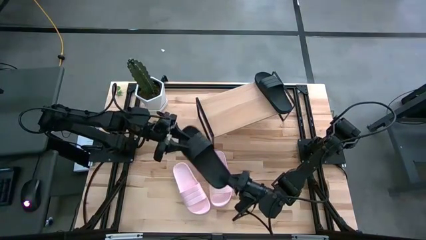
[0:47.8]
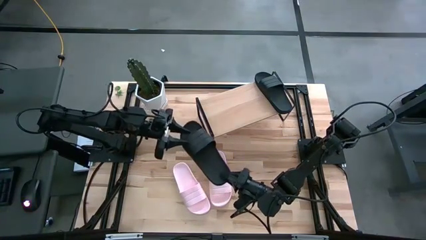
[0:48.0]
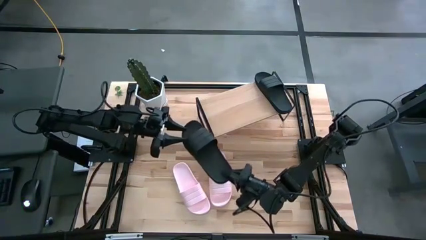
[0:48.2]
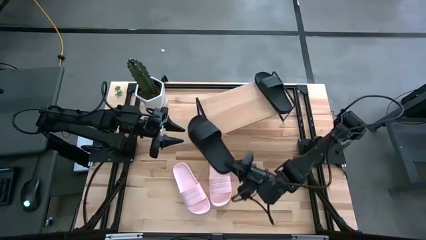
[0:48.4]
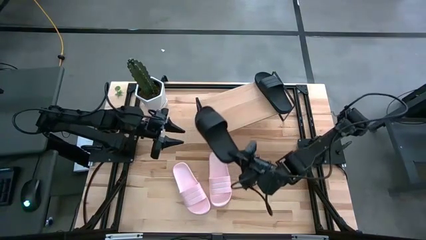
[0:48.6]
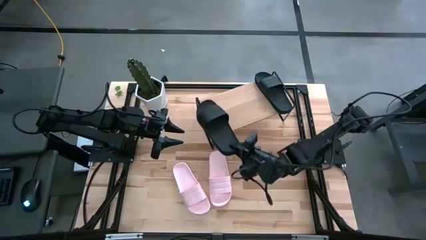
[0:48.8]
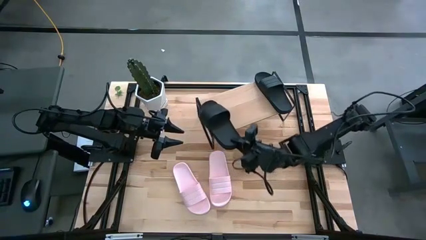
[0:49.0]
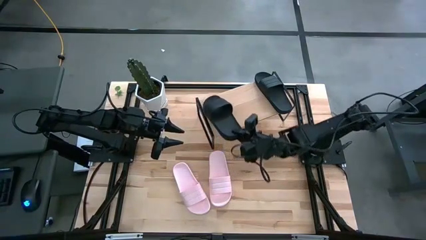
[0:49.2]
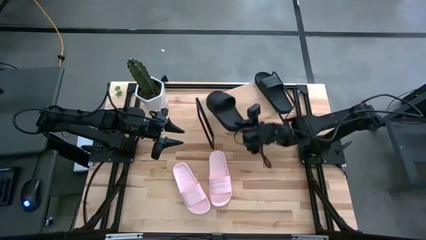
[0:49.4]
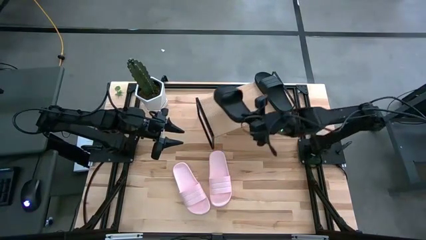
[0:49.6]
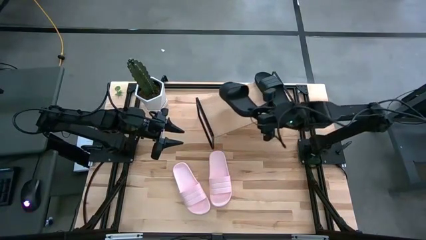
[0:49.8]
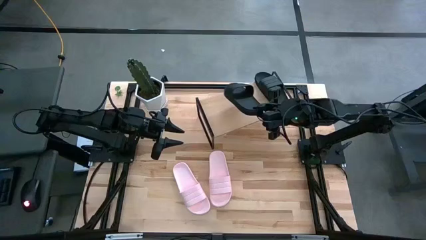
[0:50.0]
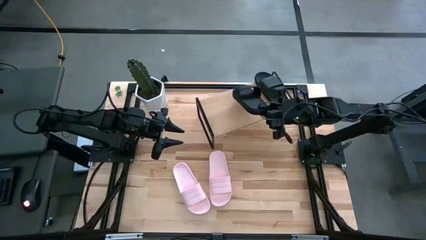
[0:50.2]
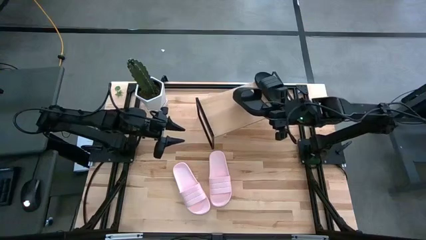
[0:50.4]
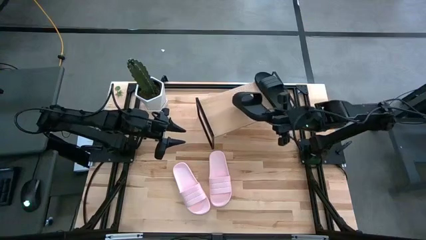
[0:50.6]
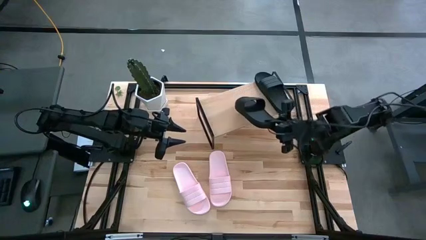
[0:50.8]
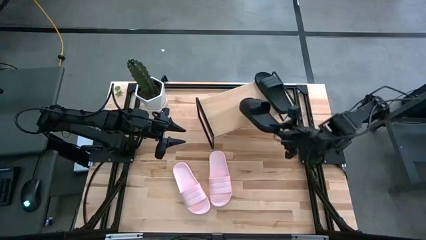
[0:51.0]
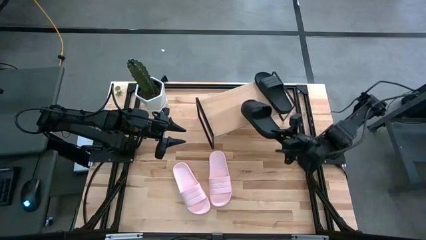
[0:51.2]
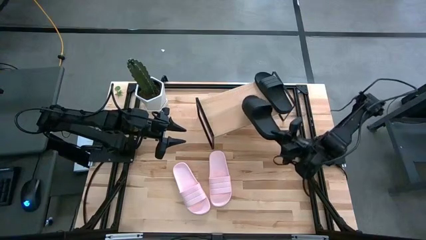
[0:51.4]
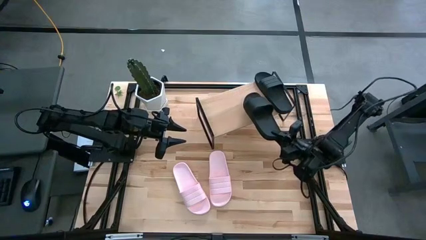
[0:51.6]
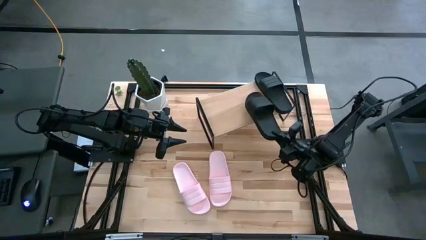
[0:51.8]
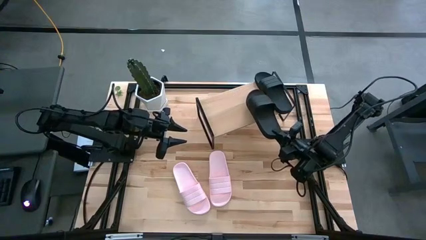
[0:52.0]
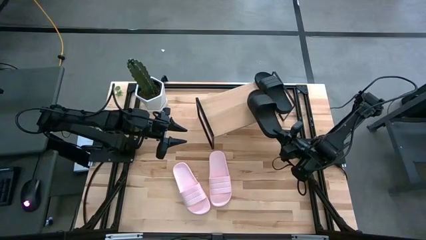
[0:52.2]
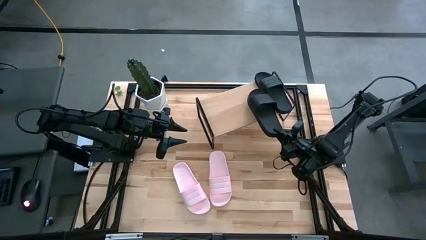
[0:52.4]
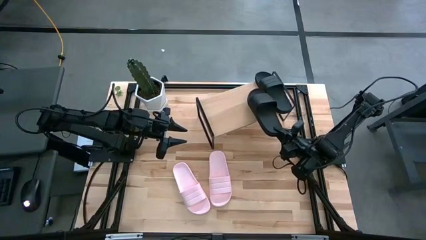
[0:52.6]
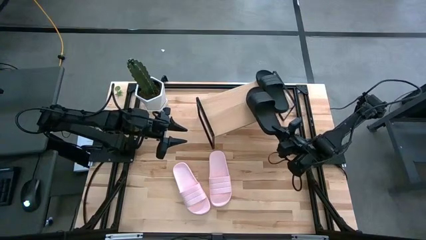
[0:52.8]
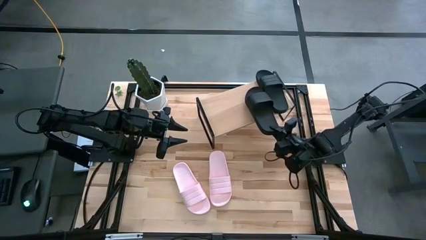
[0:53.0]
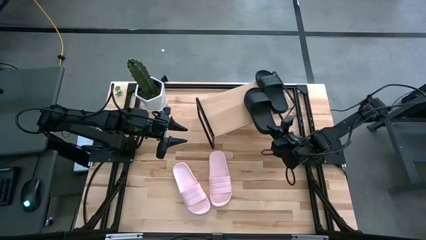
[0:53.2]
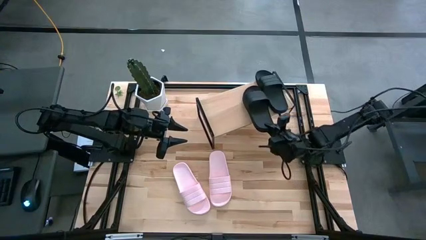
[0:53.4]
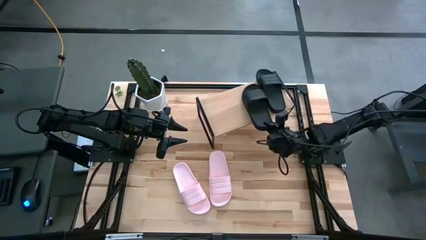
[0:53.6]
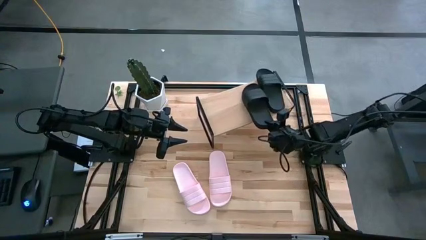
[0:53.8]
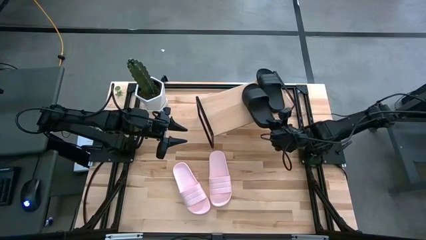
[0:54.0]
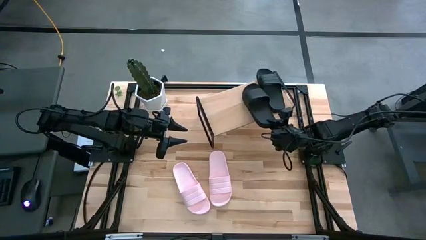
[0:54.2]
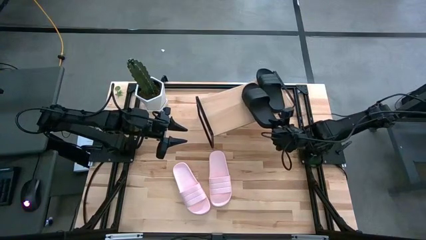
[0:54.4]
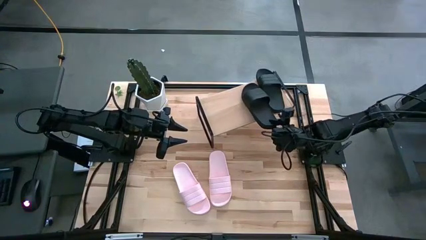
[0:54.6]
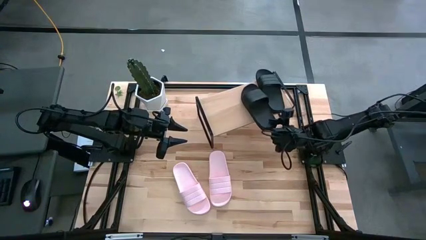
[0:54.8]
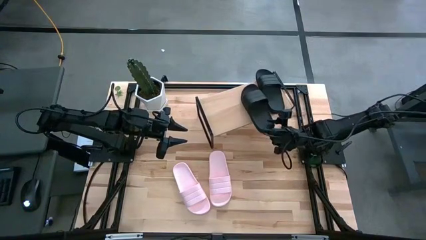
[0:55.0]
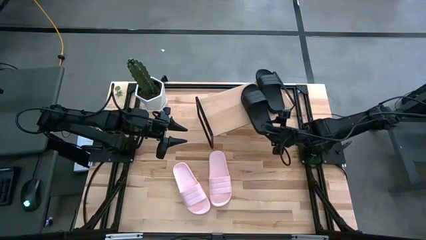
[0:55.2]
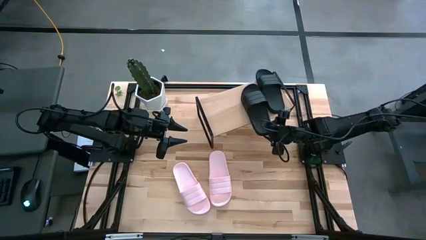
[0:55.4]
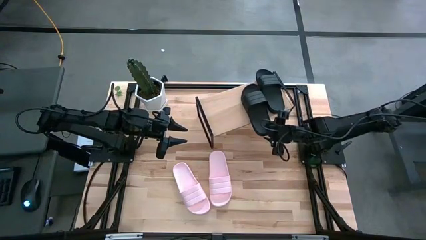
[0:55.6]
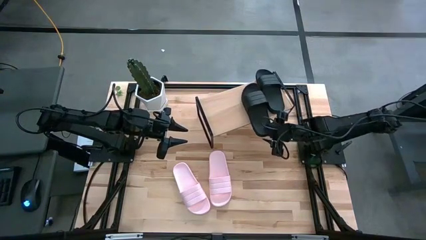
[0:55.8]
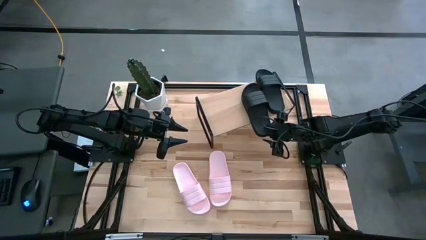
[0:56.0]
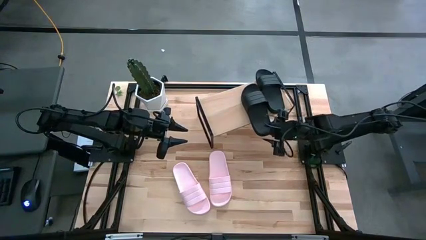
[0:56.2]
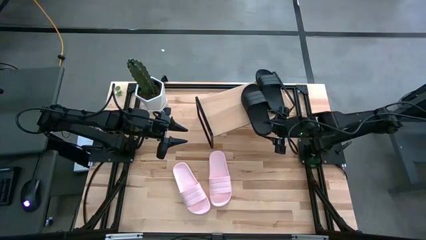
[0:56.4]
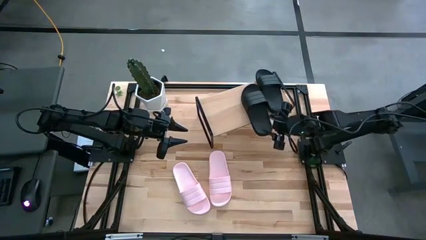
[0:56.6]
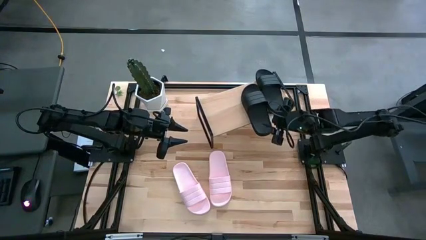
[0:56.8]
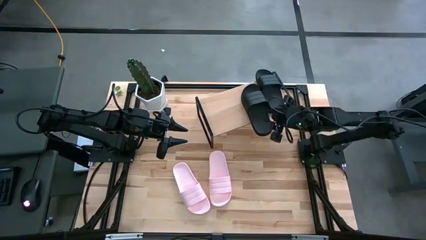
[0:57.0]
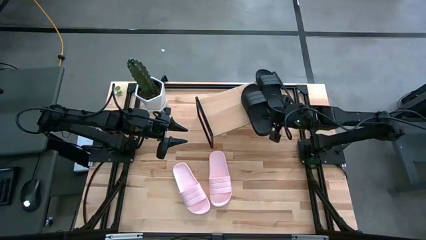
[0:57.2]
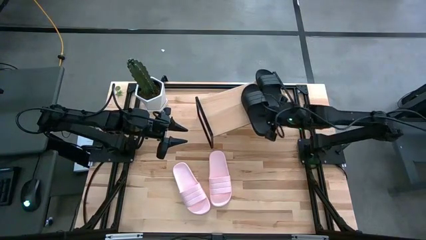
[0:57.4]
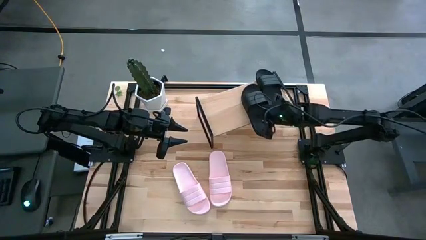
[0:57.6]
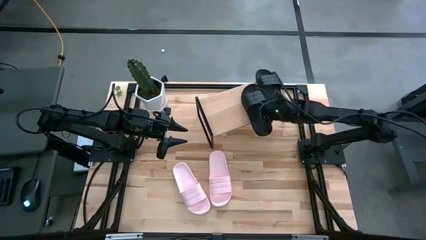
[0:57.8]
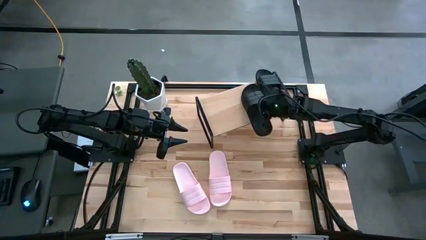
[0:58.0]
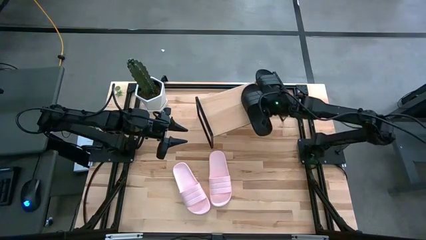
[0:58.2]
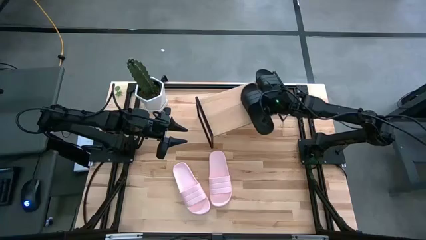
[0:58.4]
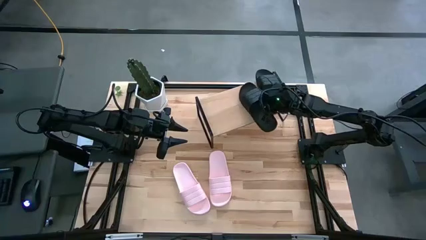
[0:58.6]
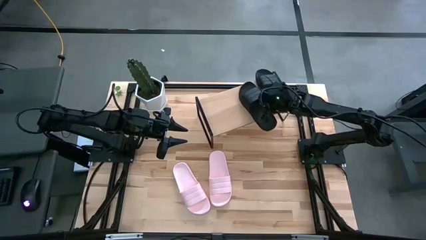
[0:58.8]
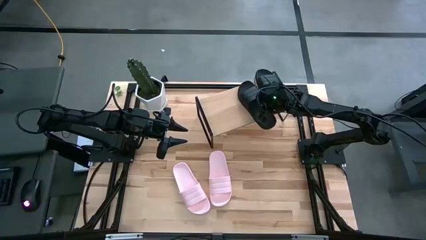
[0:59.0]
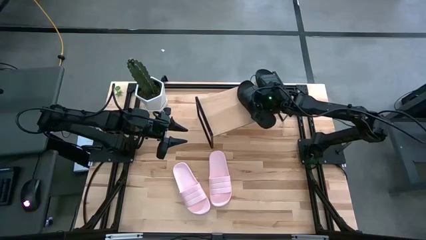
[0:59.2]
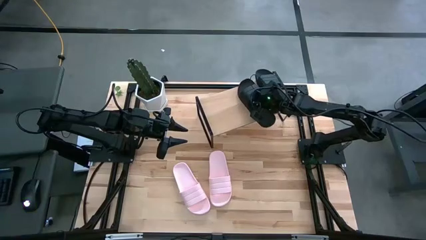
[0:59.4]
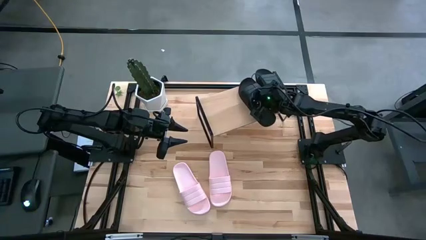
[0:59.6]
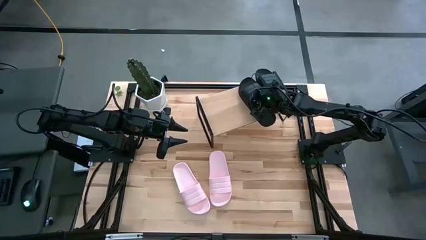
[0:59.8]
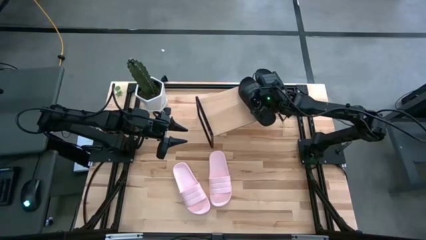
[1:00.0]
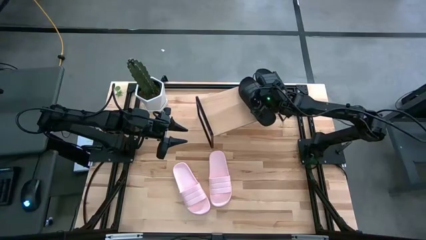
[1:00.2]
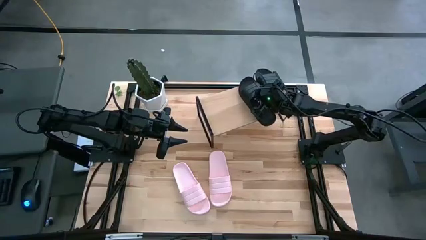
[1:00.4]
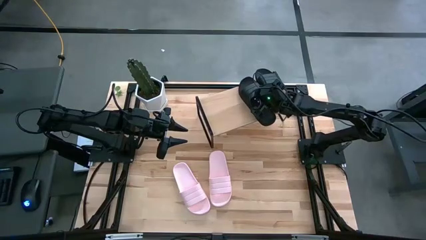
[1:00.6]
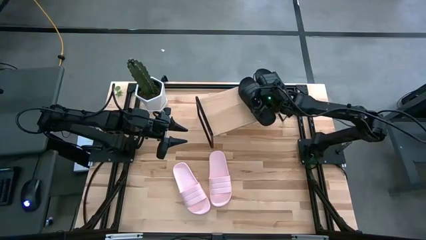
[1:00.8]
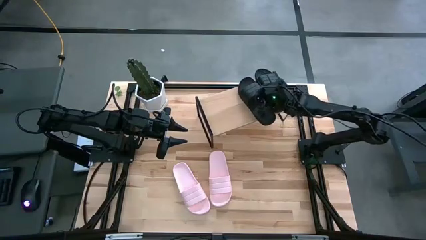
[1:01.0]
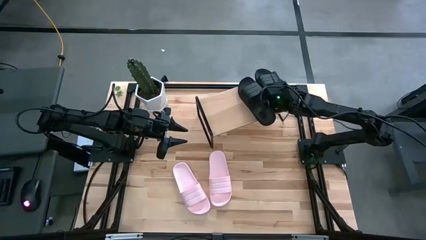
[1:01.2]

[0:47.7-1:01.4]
Task: Pick and place slides into the shelf
Put the black slide on the shelf
